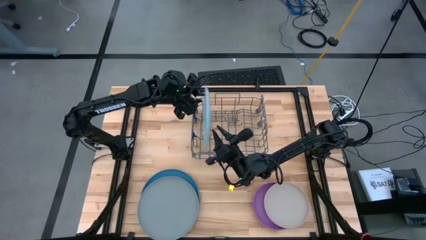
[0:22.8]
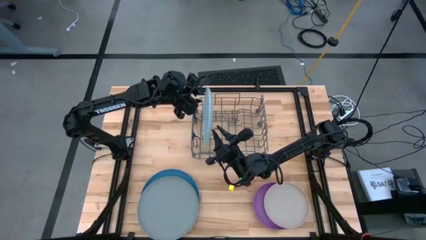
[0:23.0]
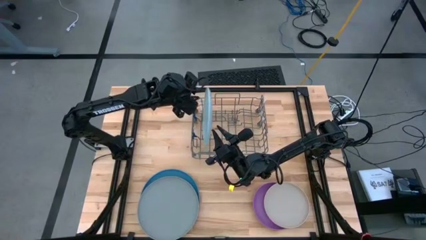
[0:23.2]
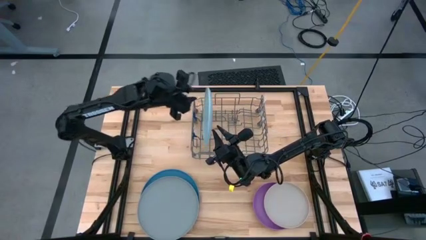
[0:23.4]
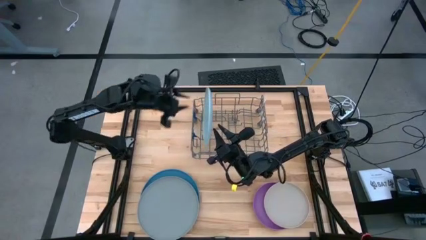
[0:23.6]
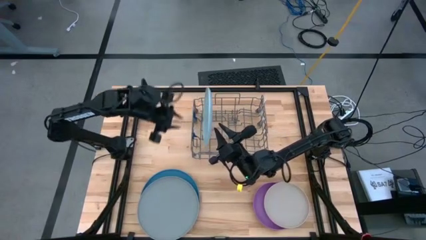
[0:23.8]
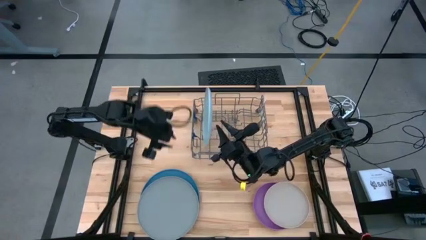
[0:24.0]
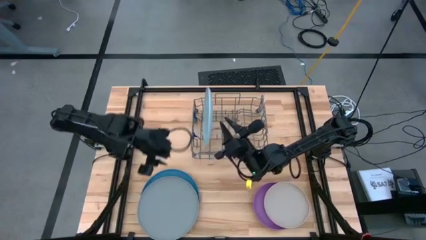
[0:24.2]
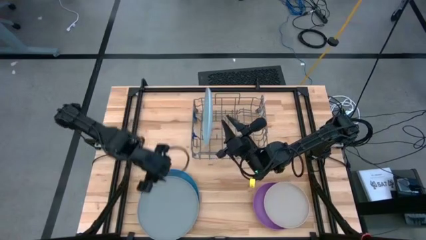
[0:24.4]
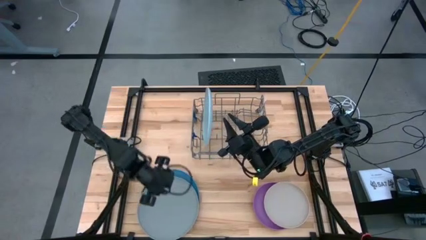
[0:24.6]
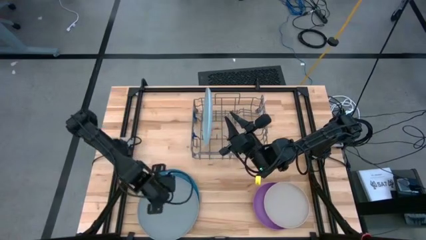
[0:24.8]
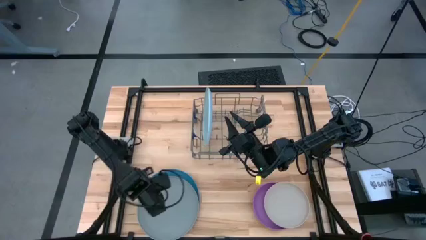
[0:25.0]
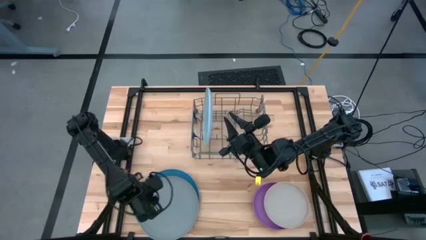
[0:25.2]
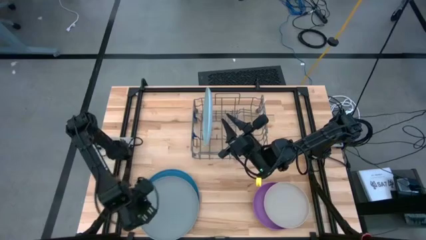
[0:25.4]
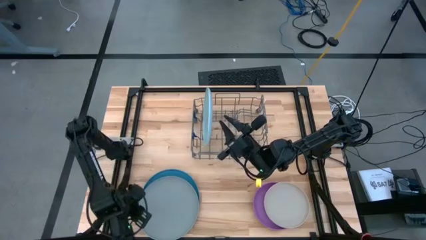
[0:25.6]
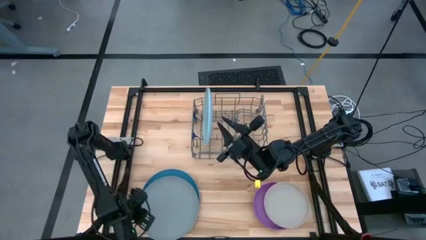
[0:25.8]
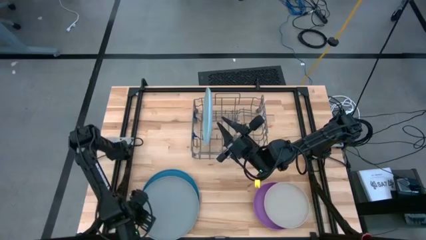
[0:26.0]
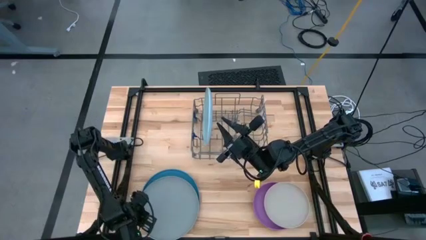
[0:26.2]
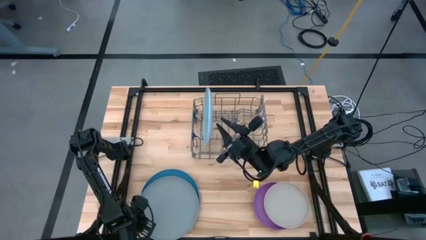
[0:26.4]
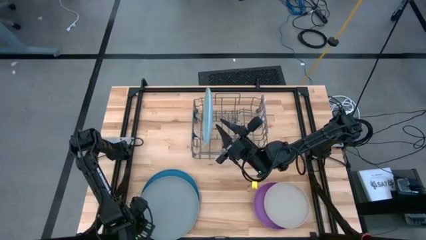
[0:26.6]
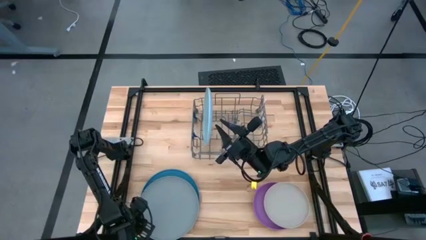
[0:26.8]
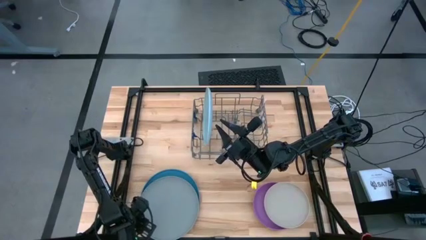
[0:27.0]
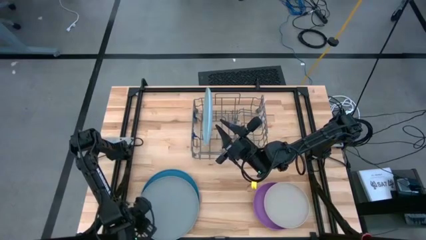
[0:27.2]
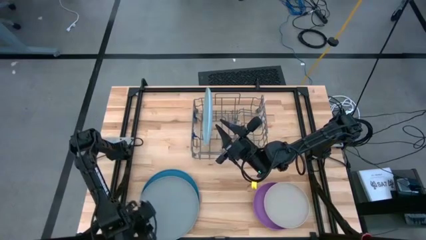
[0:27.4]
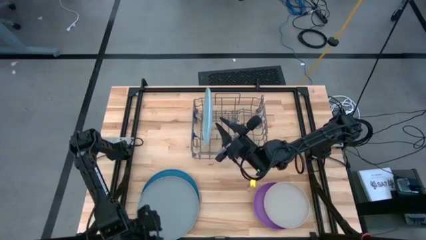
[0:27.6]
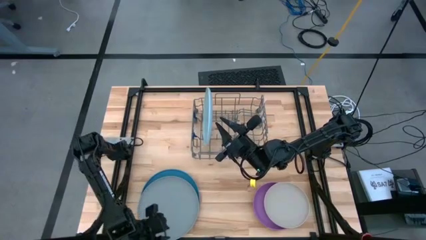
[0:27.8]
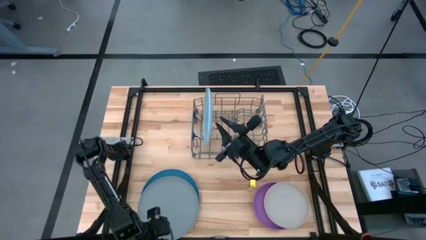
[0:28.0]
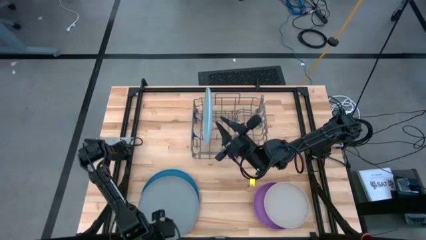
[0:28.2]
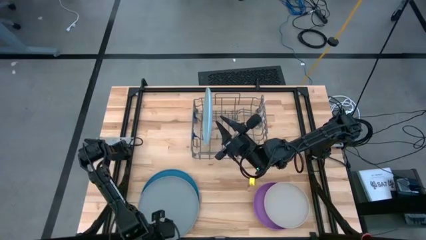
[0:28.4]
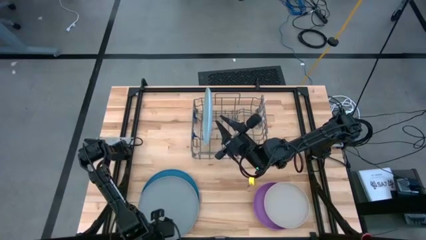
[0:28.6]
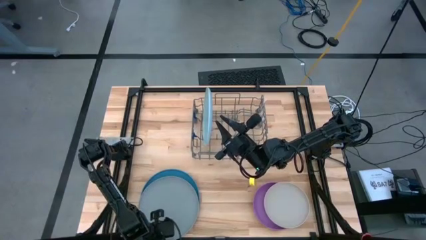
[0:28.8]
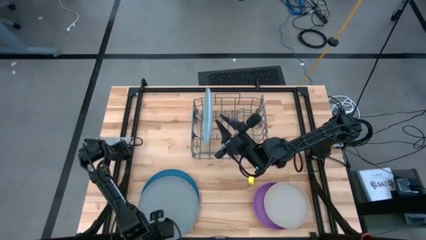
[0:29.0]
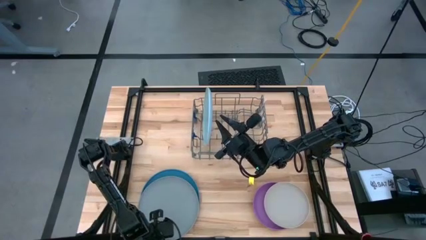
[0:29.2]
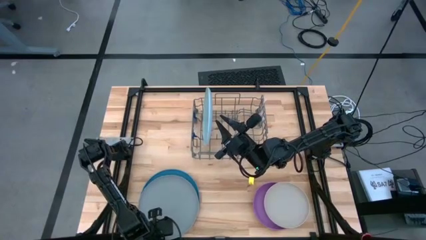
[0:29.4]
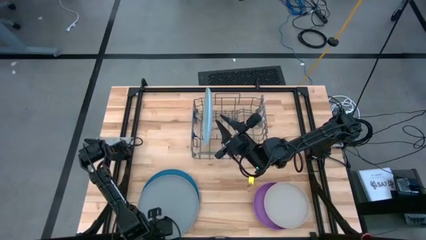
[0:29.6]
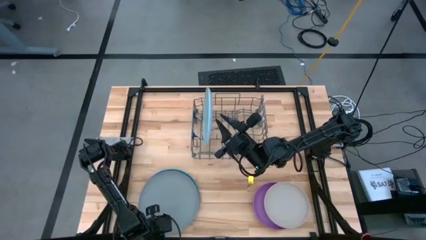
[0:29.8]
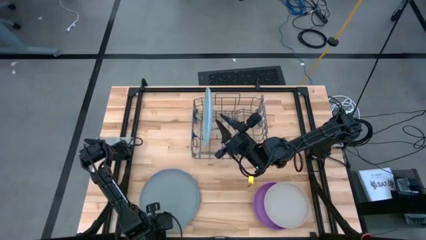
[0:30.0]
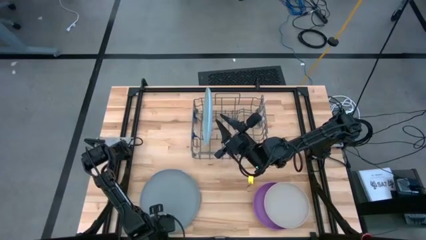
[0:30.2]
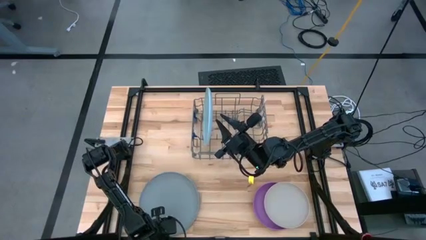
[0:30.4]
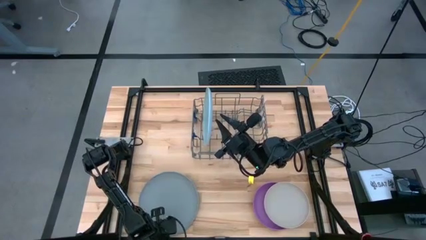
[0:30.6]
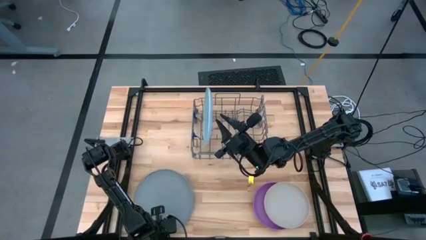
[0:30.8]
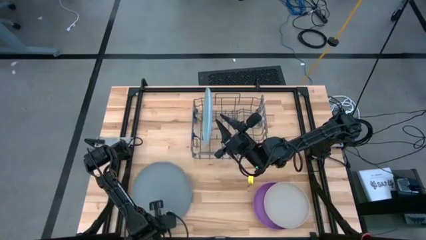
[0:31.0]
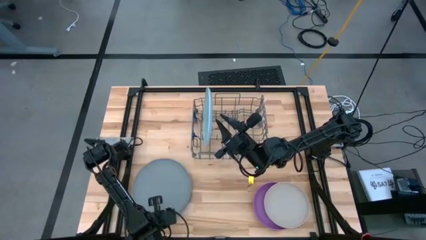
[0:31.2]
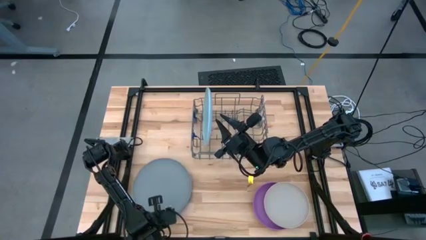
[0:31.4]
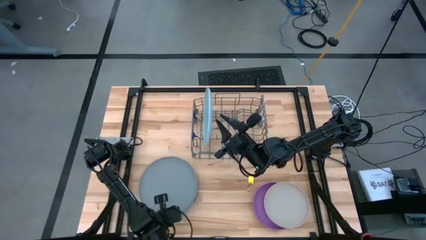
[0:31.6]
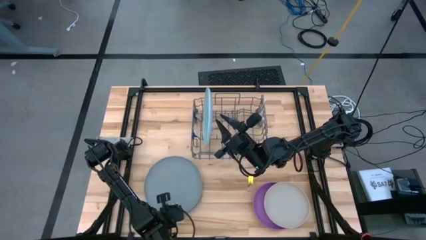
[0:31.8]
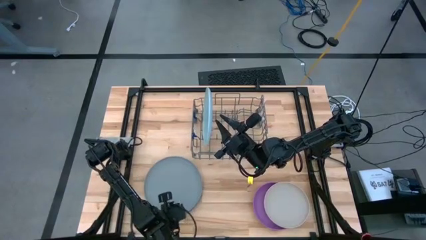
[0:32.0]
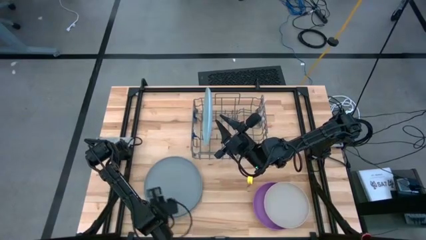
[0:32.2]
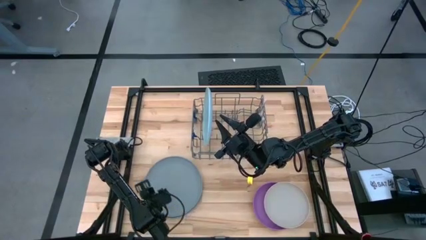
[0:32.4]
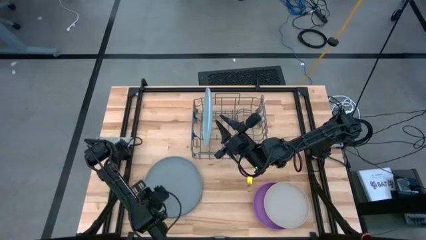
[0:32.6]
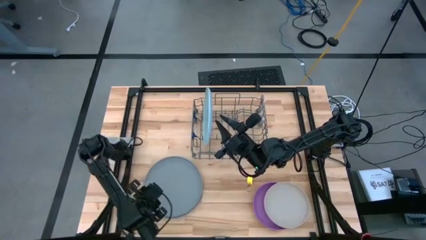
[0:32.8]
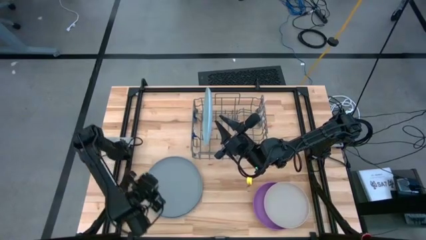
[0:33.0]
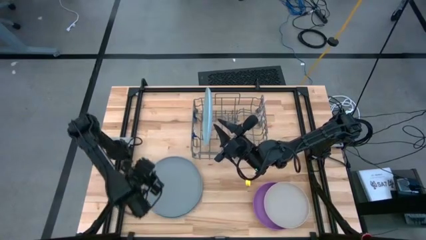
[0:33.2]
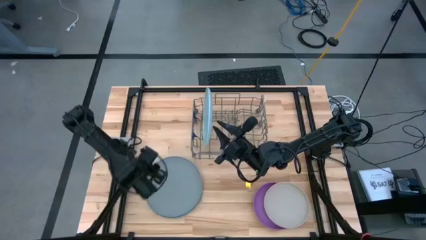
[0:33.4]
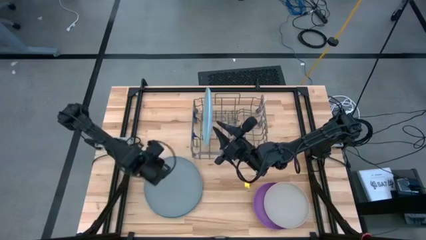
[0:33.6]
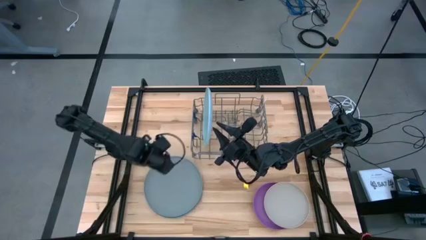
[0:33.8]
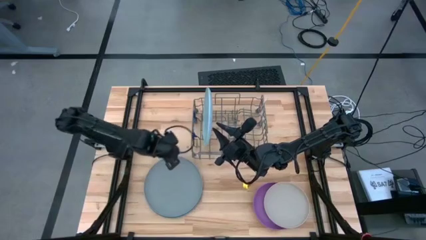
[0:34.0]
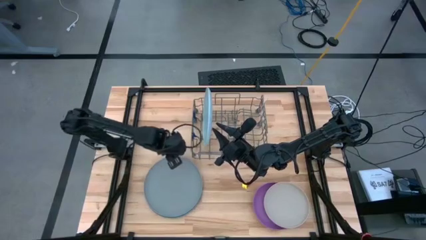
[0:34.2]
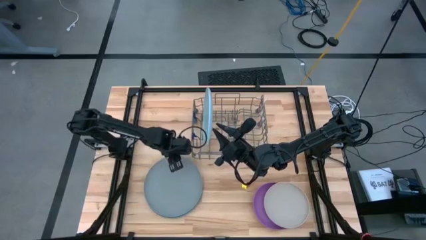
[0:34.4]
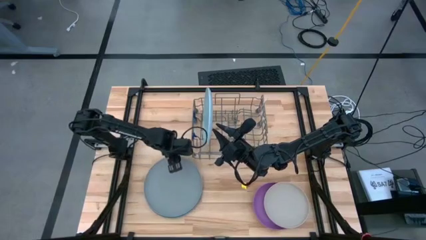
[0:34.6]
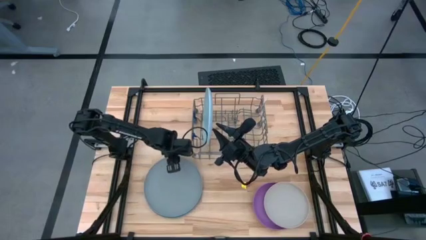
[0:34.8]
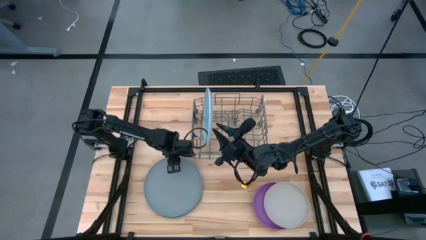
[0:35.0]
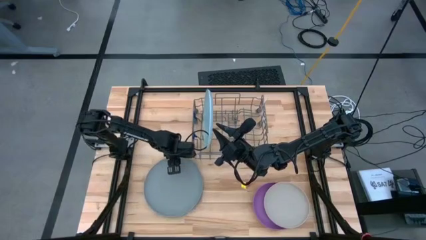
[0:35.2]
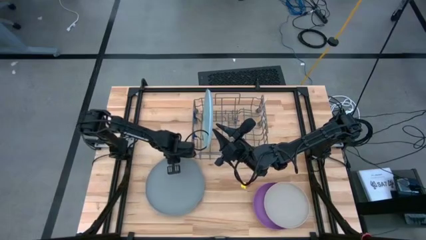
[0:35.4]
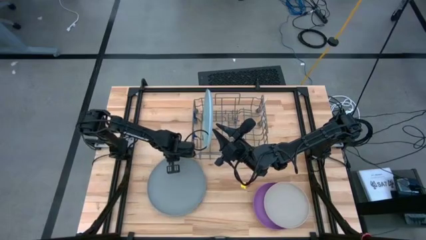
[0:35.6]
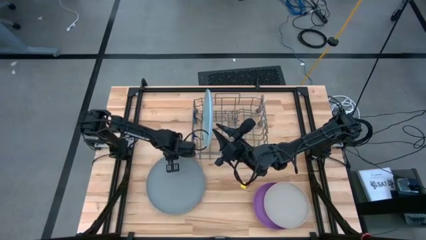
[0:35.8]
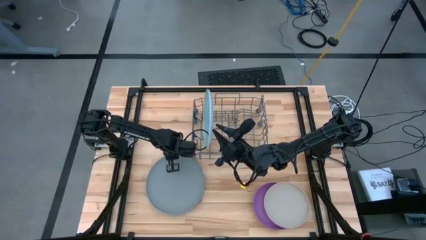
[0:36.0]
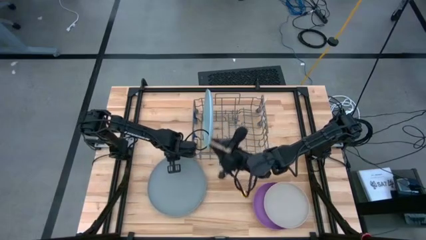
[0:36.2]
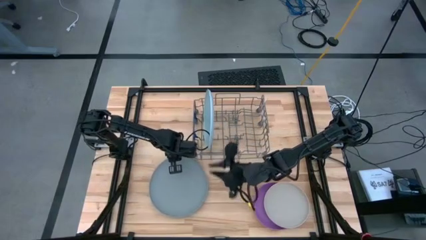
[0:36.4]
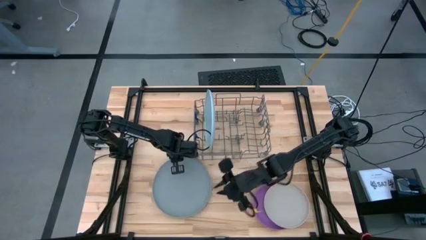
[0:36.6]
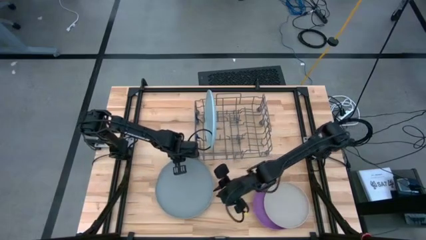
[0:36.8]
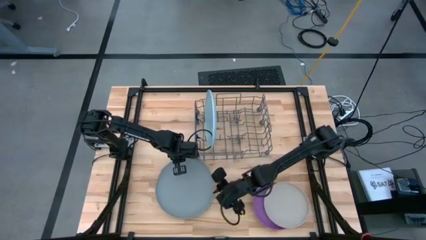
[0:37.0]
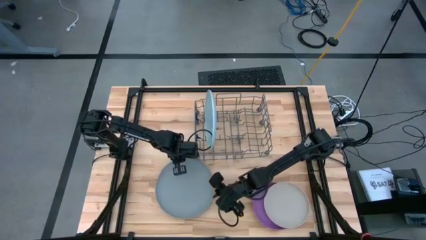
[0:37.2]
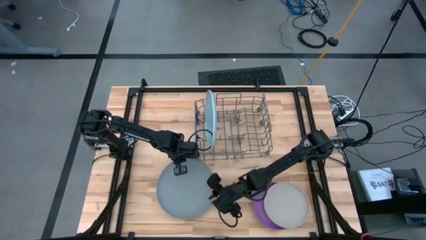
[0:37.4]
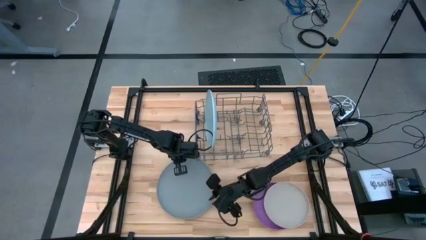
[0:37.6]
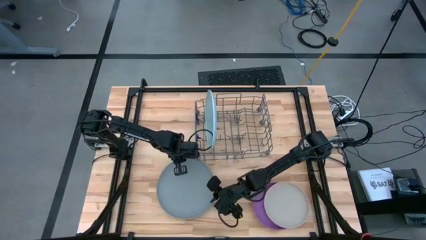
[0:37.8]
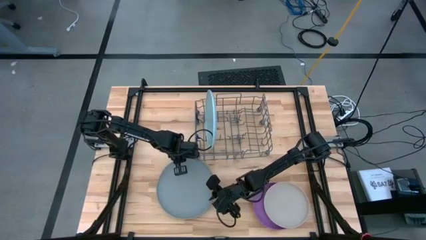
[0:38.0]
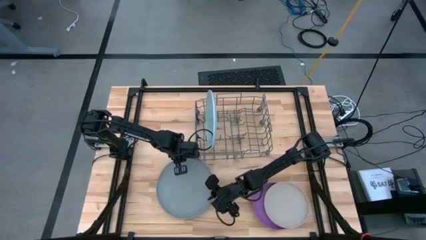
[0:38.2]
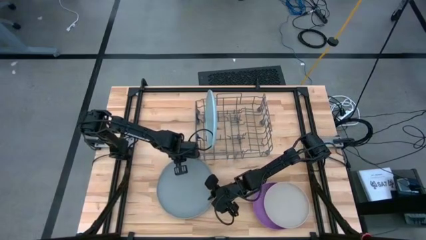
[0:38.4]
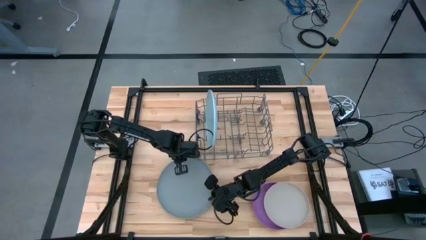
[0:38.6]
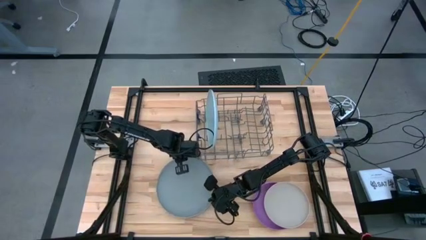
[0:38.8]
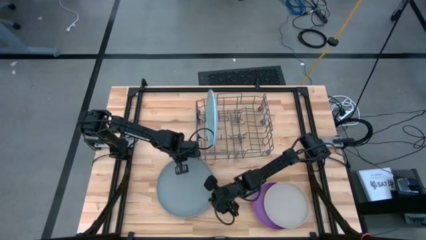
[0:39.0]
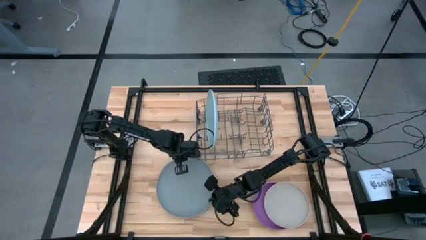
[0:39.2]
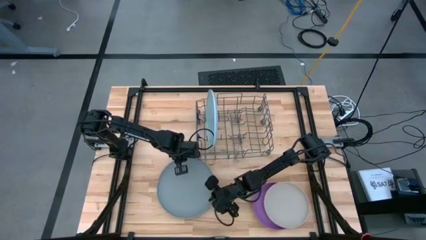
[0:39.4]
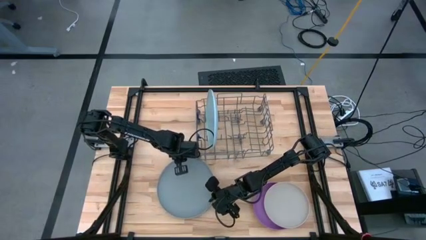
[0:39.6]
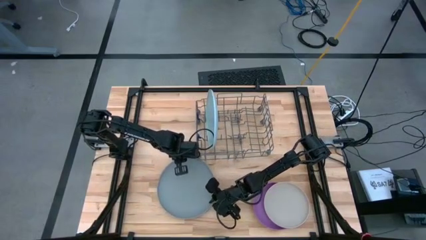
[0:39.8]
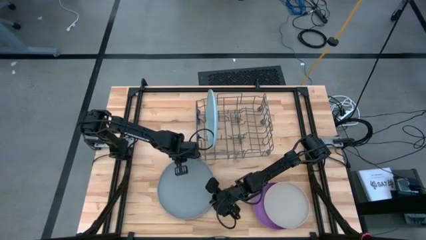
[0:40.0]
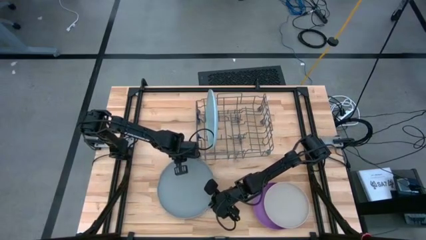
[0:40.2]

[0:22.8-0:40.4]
Task: Sort dishes
Put the gray plate into the dish rack
